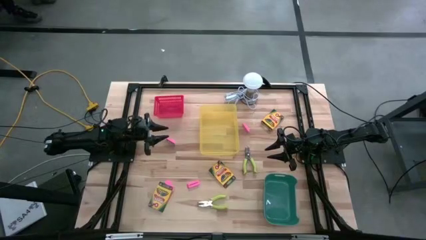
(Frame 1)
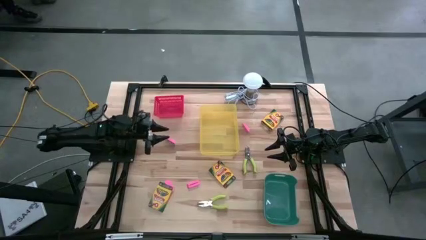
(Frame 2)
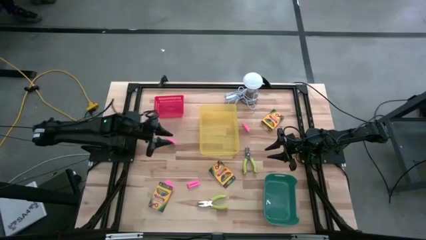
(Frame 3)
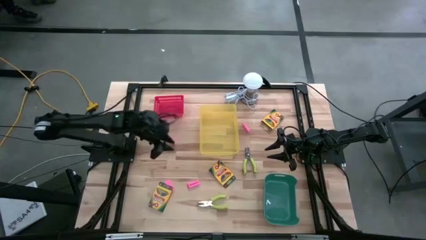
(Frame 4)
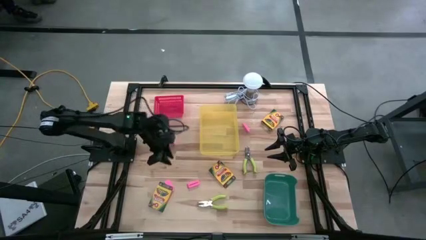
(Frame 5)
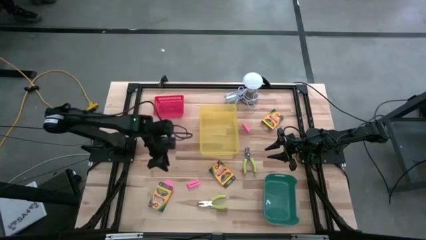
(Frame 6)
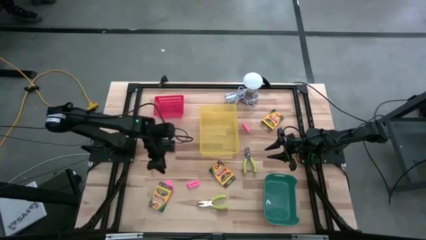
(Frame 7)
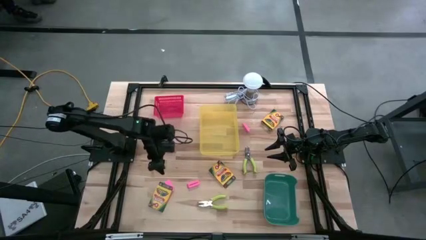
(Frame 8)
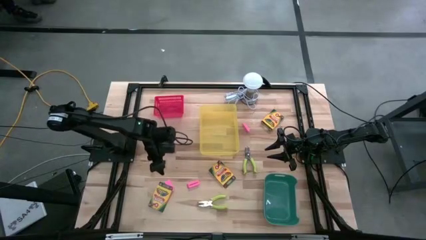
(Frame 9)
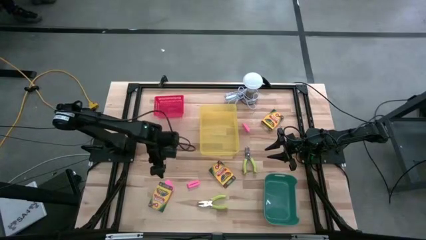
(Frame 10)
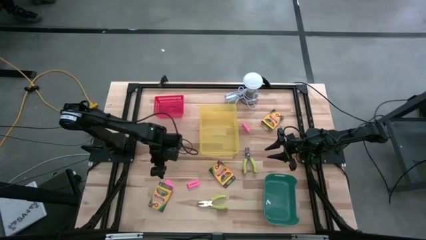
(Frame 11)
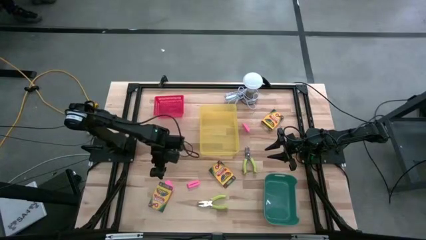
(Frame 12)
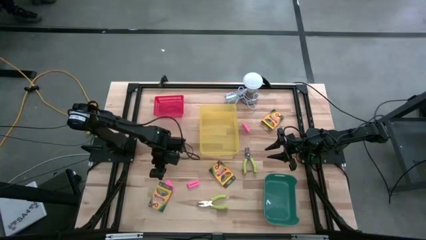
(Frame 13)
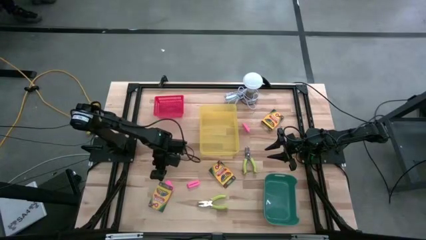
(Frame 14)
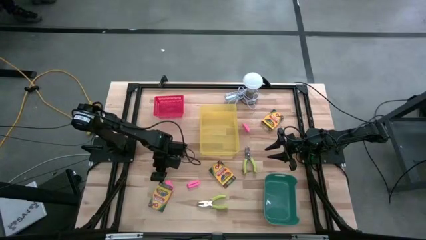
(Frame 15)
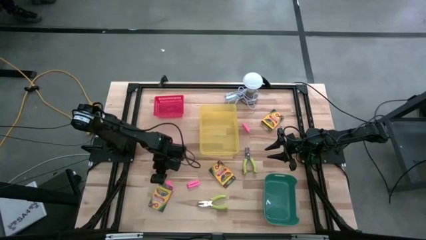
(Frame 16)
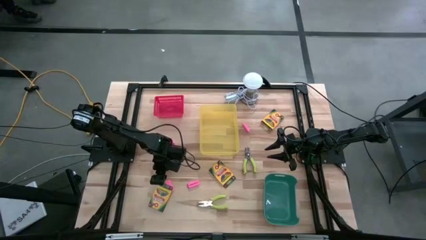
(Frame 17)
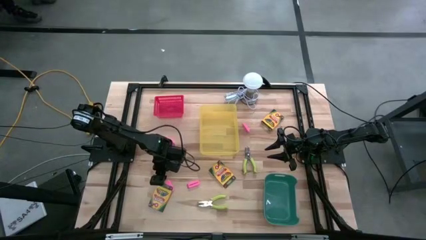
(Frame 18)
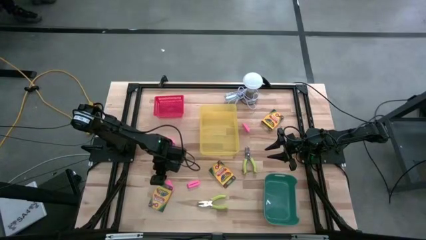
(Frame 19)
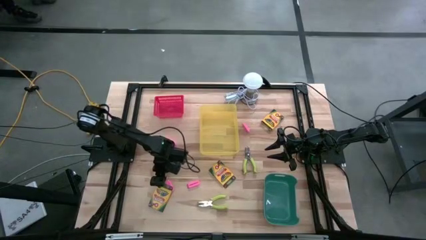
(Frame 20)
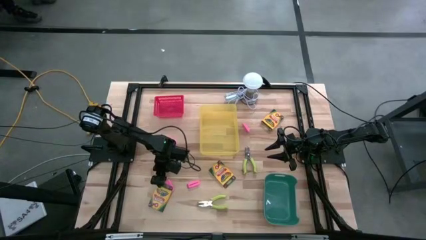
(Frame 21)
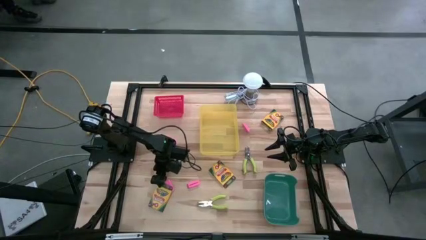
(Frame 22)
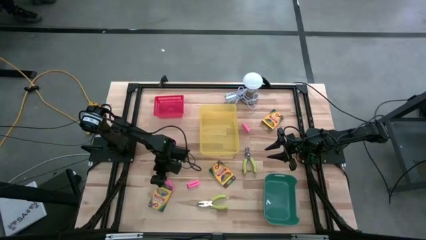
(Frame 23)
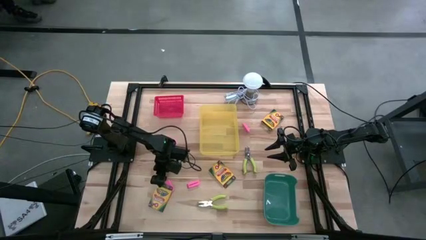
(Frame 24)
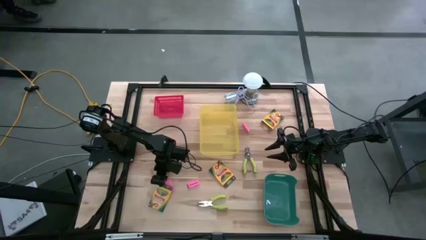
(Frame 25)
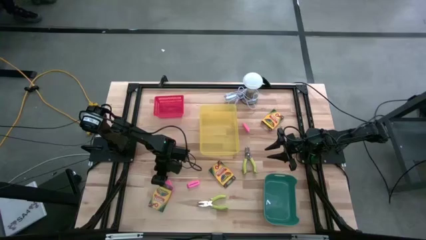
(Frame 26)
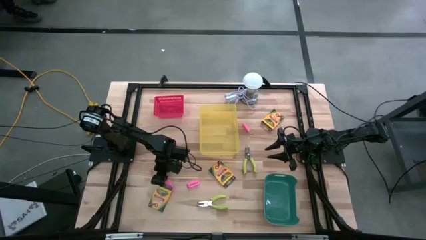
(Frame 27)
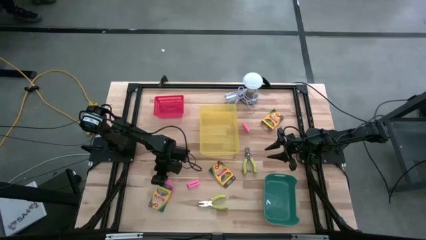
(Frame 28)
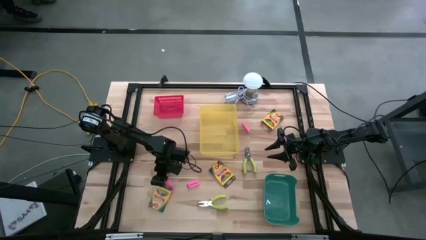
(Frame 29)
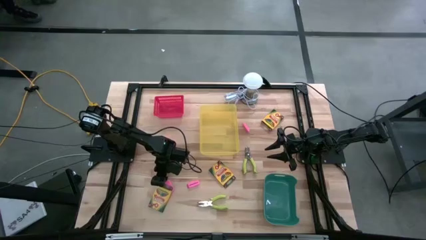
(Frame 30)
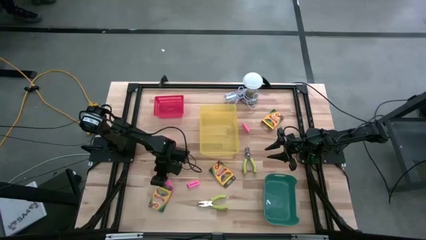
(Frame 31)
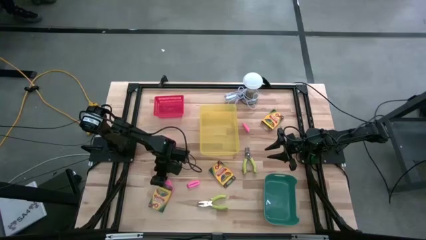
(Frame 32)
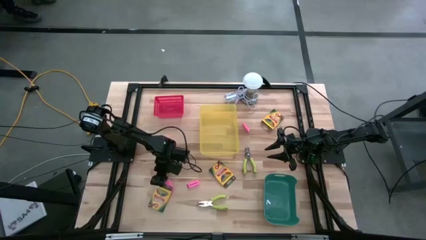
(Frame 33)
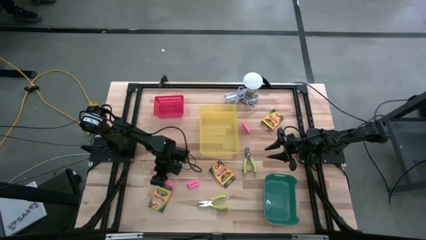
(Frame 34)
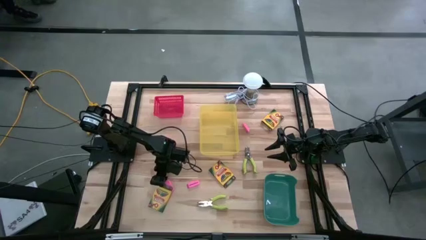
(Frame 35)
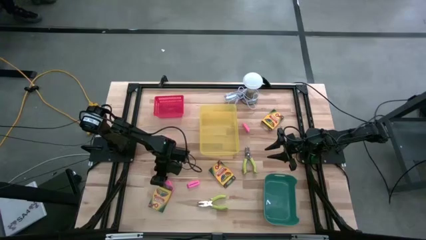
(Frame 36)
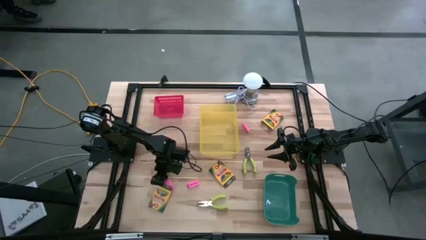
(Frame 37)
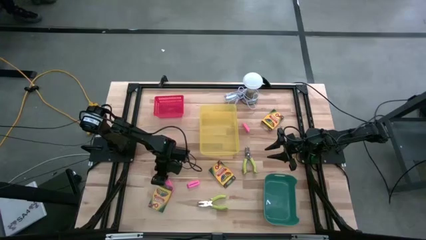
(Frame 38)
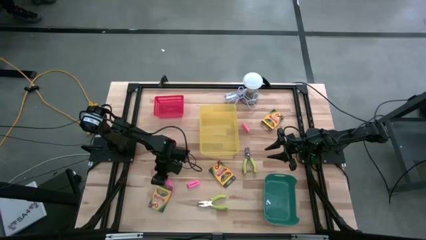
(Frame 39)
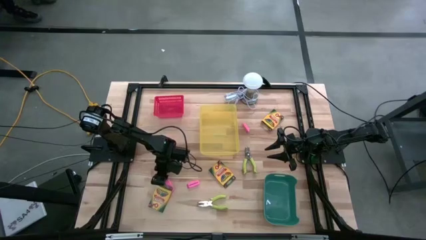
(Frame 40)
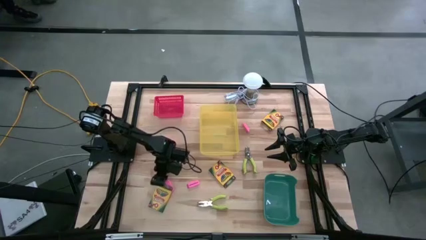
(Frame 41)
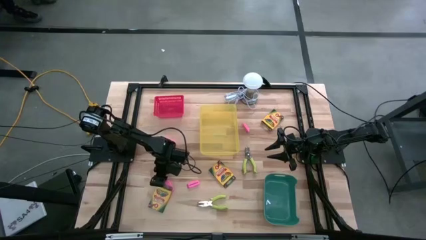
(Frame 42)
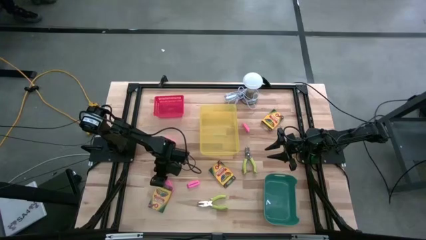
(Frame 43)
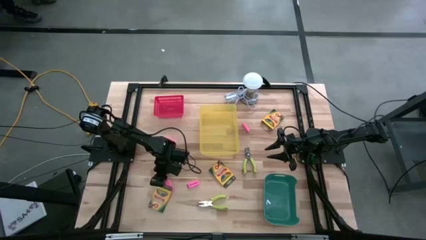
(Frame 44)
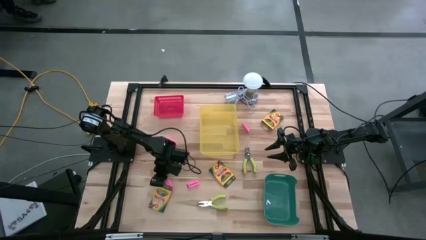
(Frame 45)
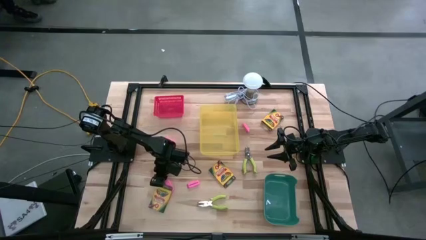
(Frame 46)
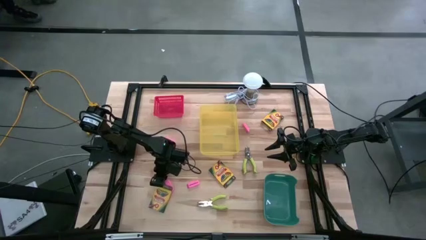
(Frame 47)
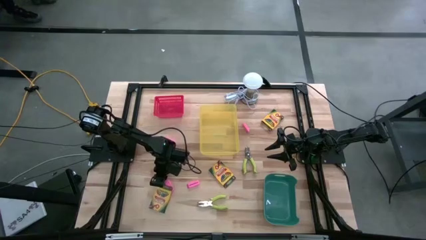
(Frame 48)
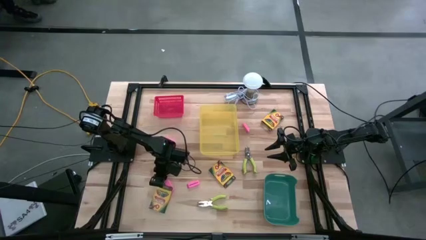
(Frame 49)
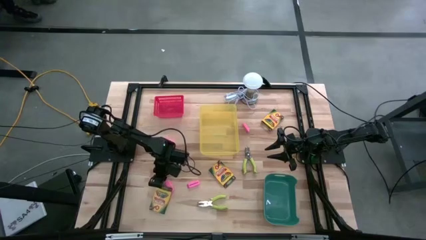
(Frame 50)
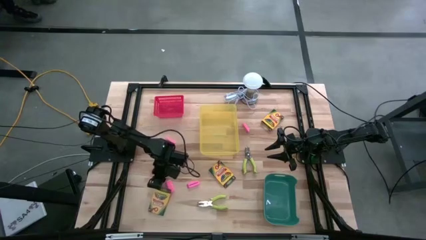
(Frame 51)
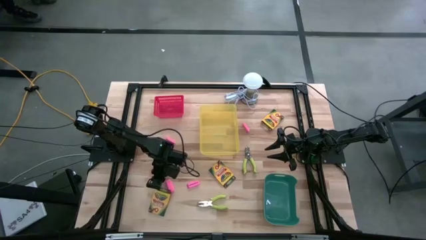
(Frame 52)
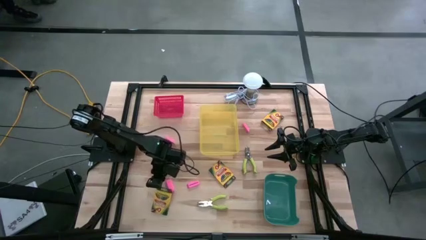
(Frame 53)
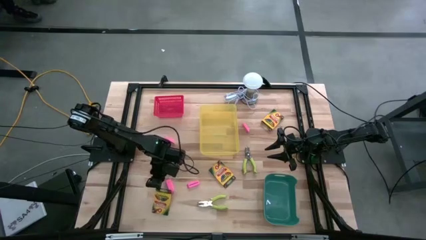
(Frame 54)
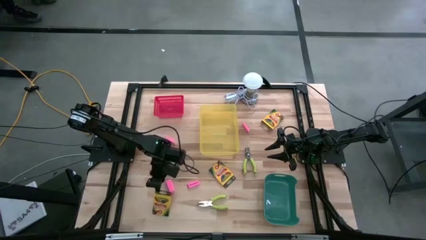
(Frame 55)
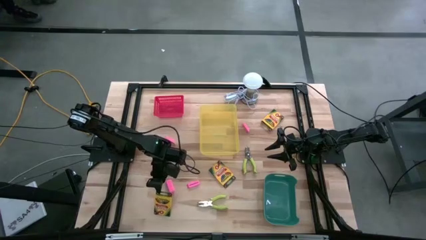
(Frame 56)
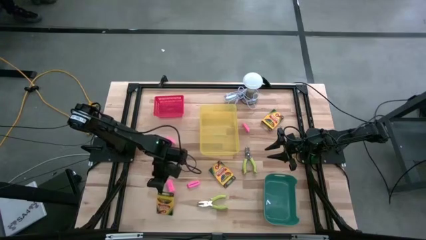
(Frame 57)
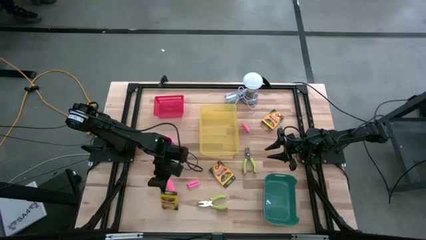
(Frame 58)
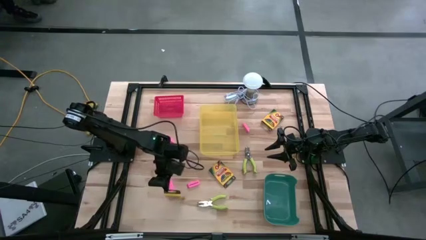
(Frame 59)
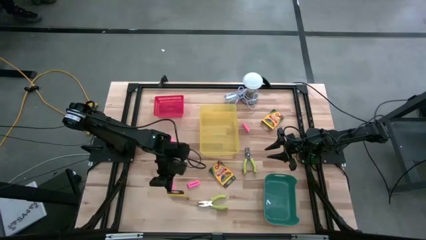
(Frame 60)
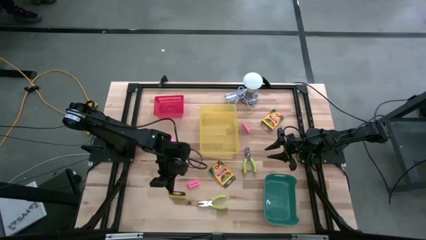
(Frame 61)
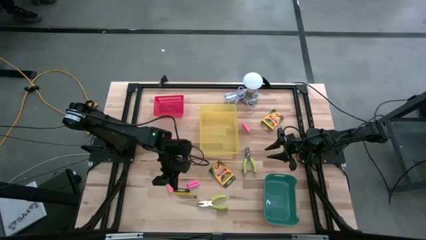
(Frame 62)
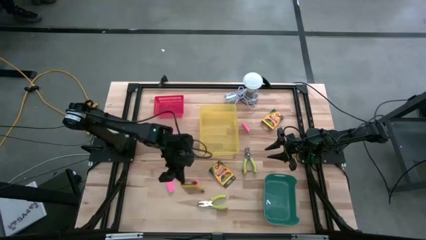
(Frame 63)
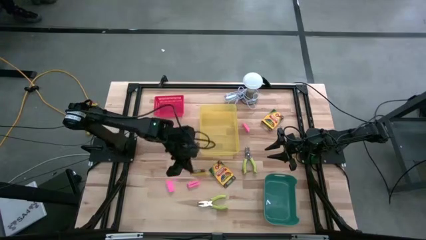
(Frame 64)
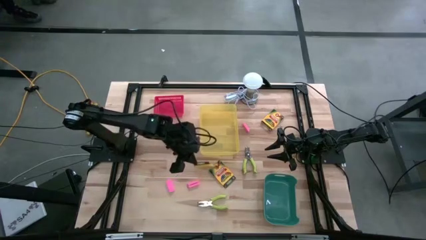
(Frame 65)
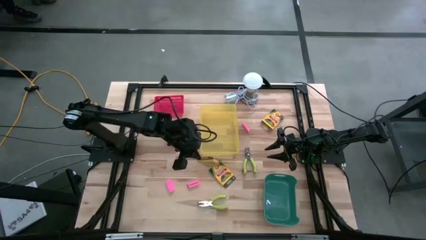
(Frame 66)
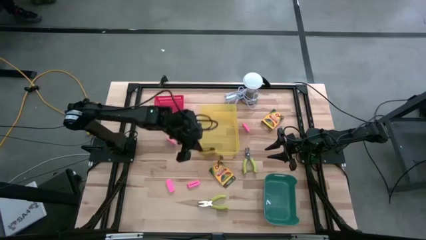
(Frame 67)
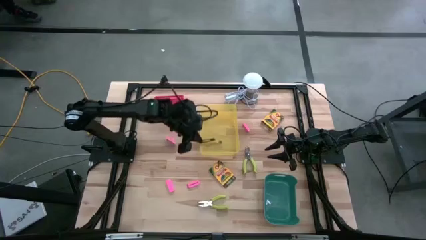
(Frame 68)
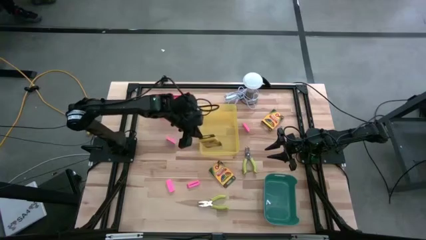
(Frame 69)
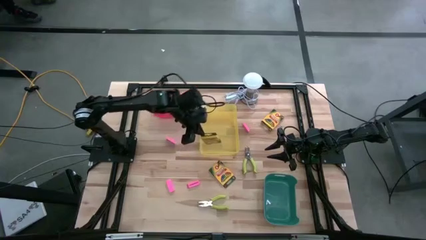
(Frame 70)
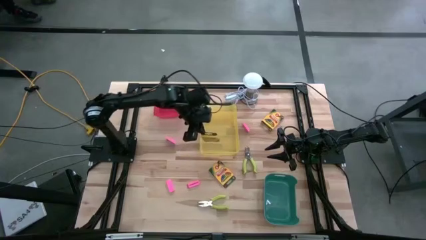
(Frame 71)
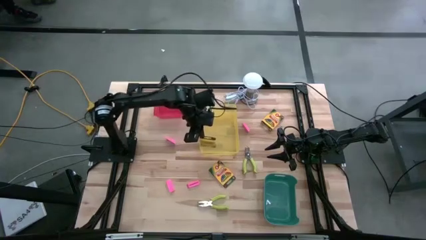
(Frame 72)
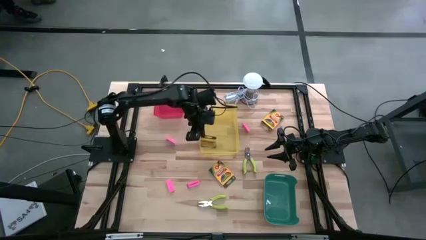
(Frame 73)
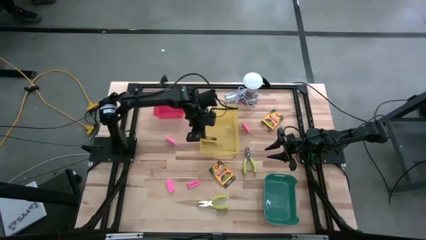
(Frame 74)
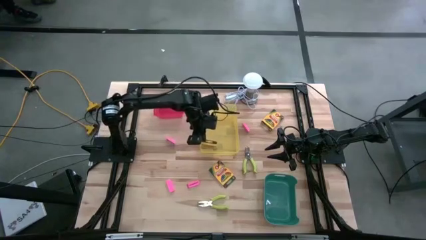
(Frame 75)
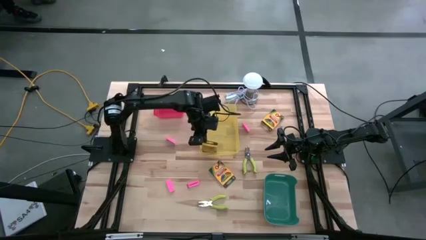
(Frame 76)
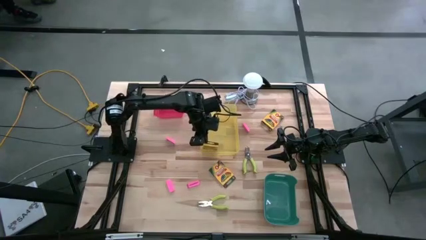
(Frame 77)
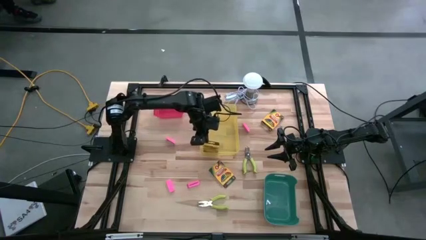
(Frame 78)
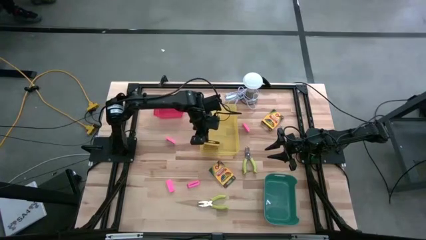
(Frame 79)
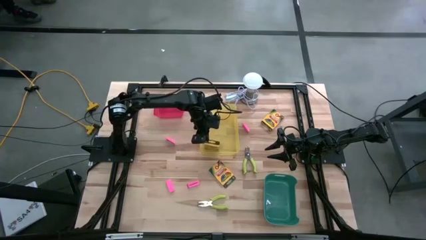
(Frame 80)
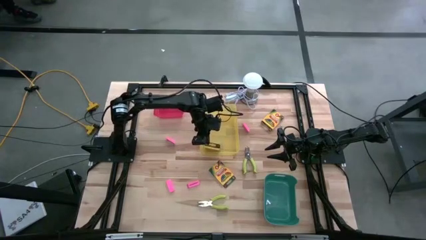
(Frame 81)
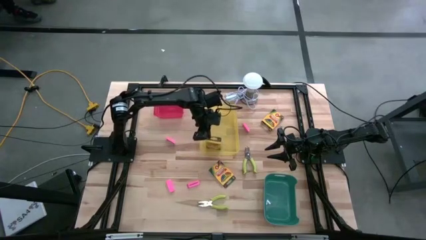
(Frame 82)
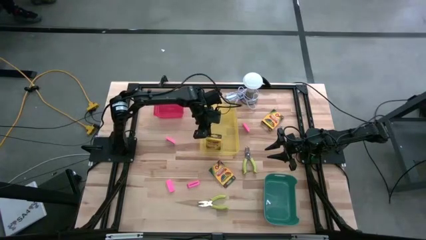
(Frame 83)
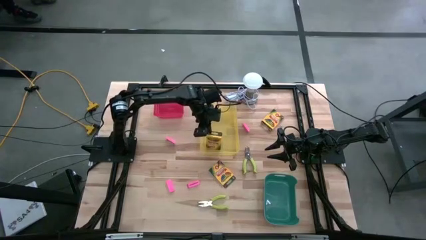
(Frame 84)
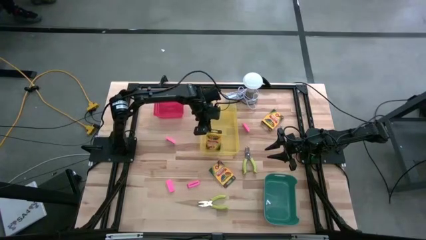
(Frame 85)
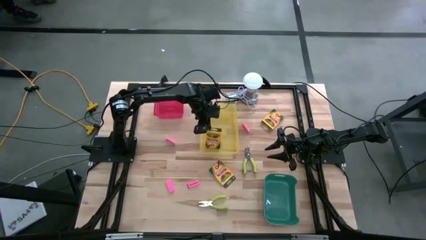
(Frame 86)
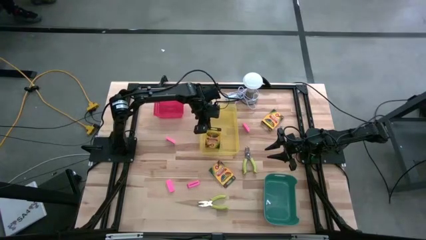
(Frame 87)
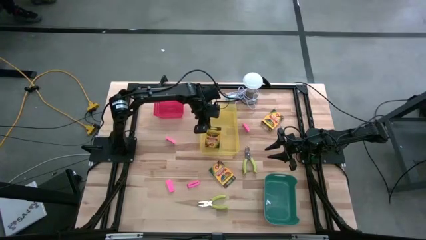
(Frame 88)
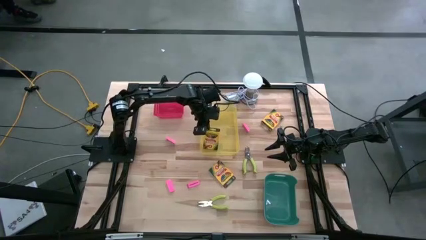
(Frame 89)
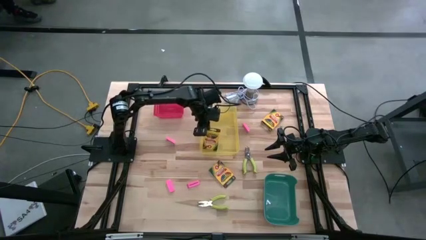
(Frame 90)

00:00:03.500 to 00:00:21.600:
Task: Pick & Place School Supplies
Put the yellow crayon box into the yellow bin
